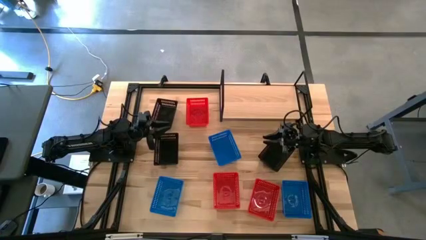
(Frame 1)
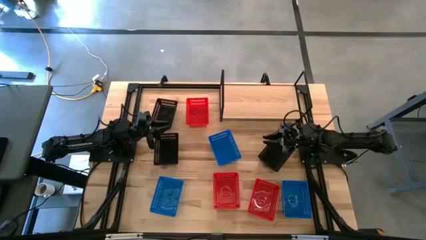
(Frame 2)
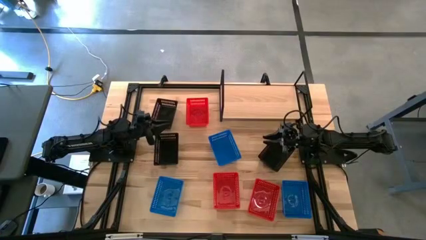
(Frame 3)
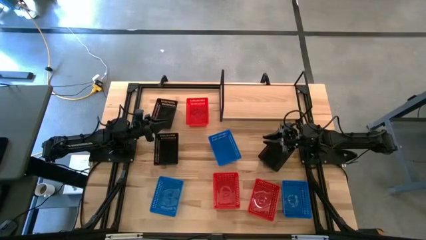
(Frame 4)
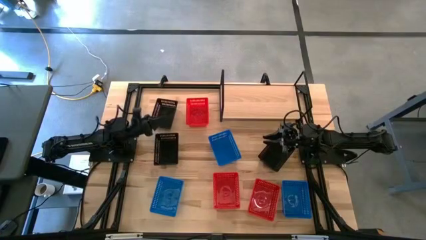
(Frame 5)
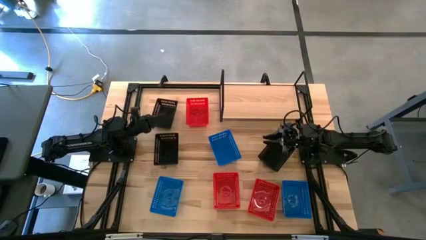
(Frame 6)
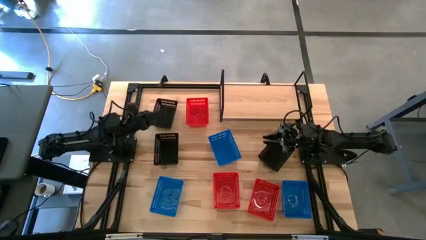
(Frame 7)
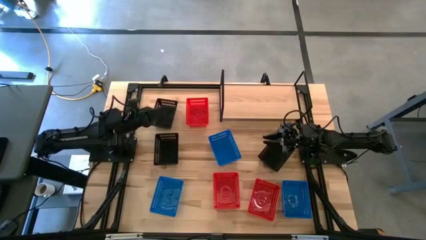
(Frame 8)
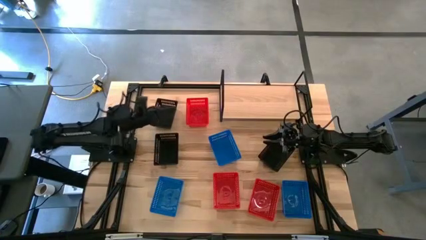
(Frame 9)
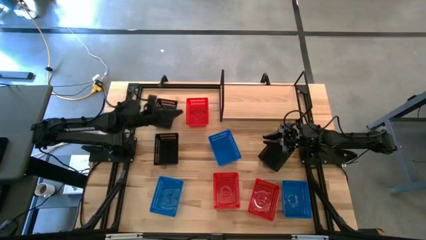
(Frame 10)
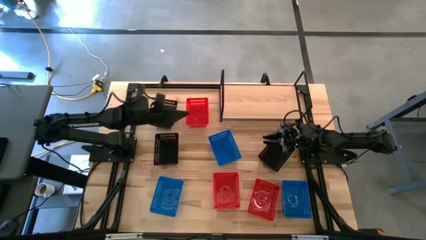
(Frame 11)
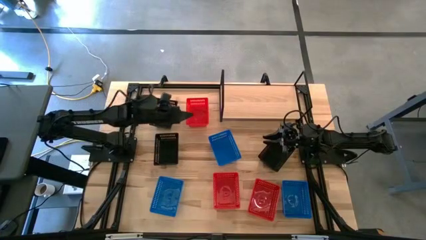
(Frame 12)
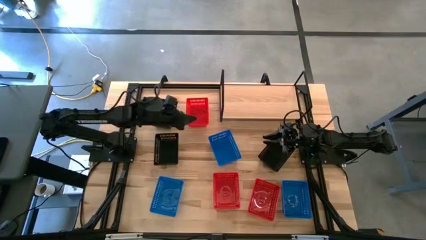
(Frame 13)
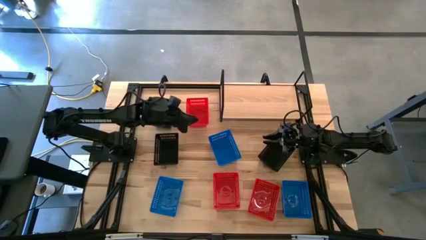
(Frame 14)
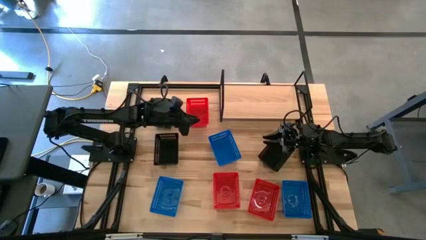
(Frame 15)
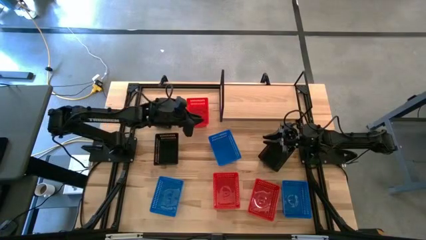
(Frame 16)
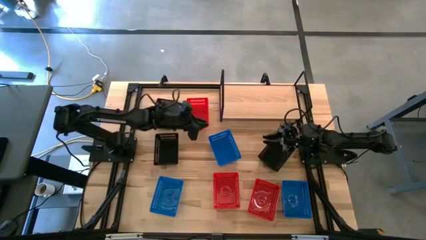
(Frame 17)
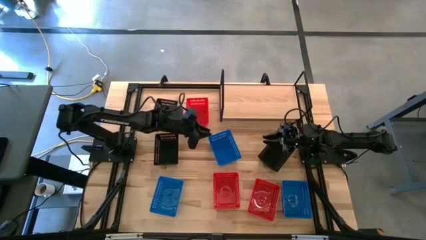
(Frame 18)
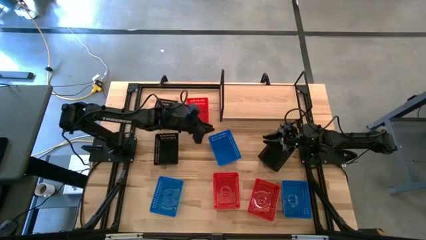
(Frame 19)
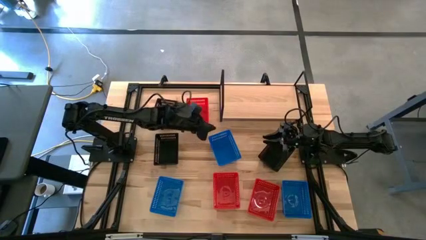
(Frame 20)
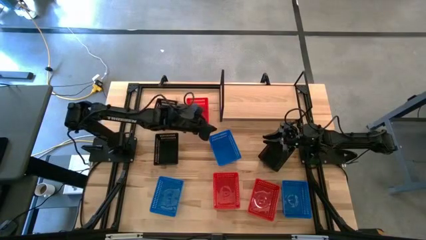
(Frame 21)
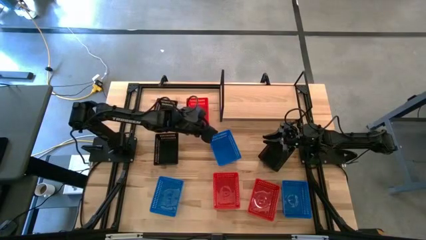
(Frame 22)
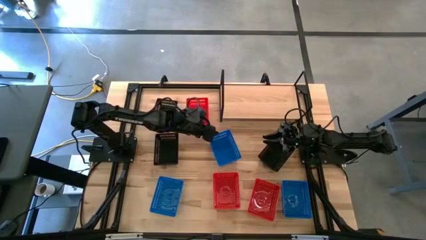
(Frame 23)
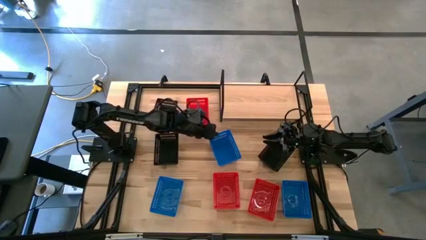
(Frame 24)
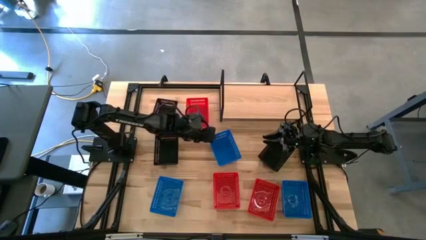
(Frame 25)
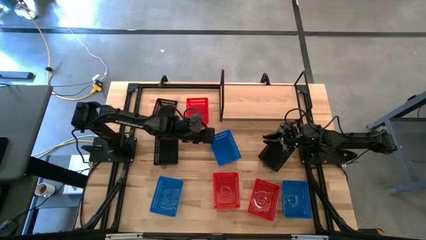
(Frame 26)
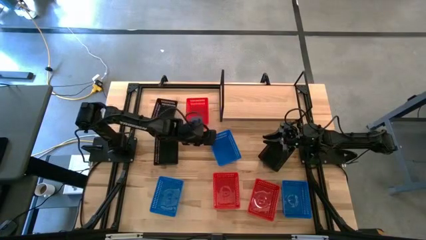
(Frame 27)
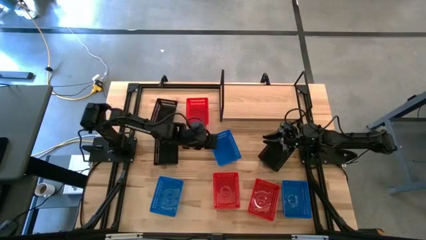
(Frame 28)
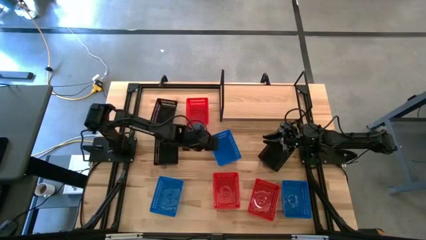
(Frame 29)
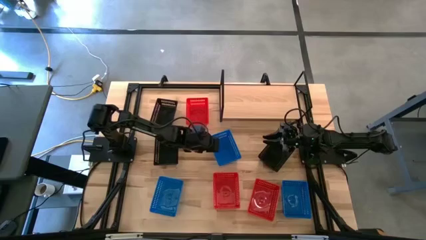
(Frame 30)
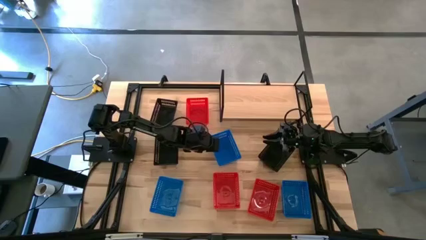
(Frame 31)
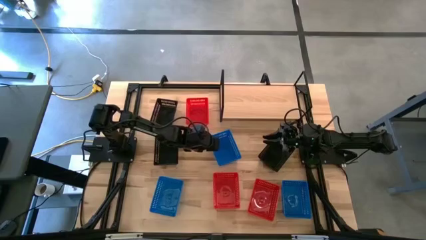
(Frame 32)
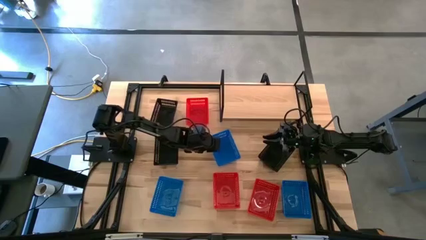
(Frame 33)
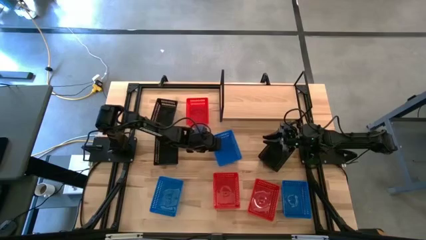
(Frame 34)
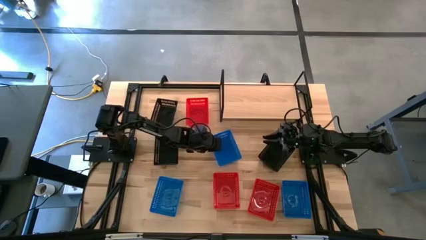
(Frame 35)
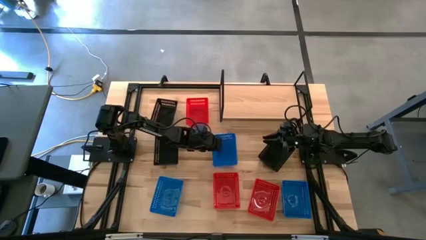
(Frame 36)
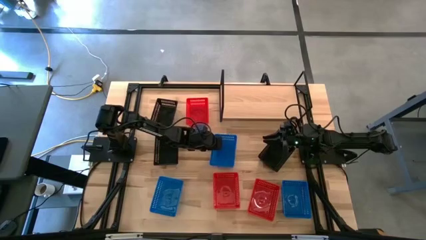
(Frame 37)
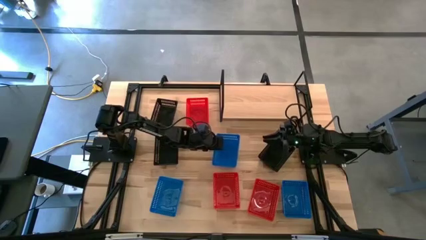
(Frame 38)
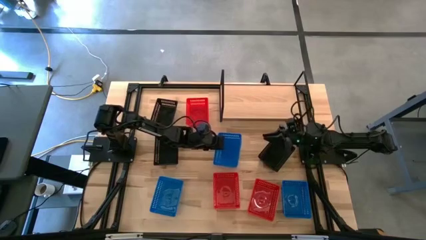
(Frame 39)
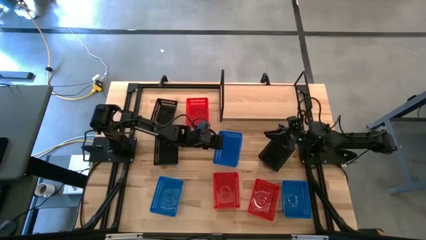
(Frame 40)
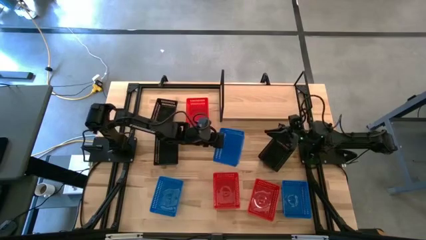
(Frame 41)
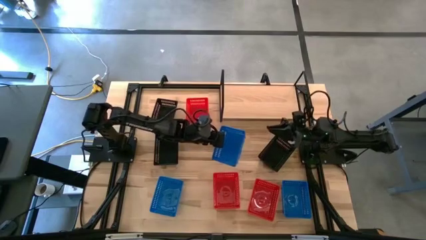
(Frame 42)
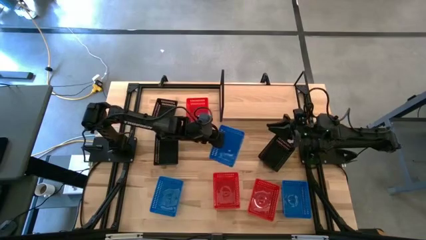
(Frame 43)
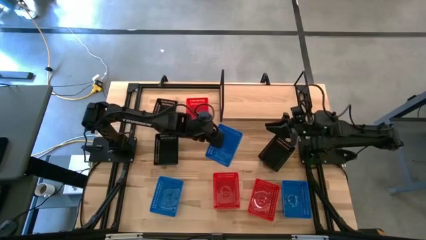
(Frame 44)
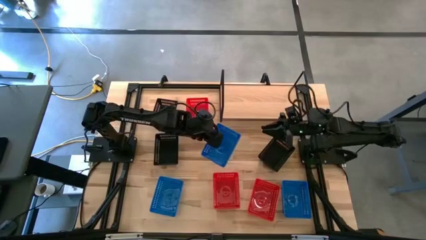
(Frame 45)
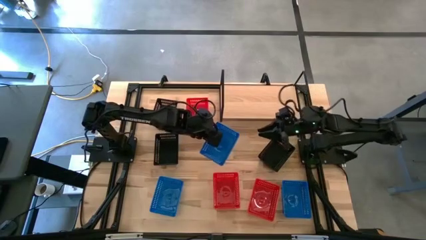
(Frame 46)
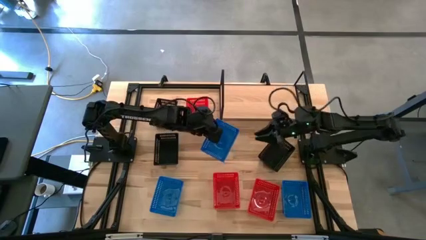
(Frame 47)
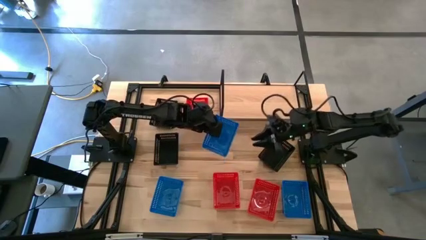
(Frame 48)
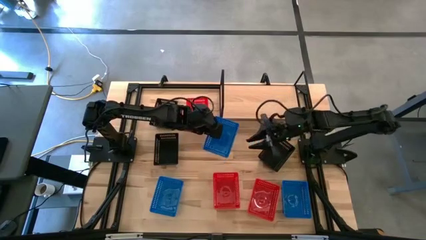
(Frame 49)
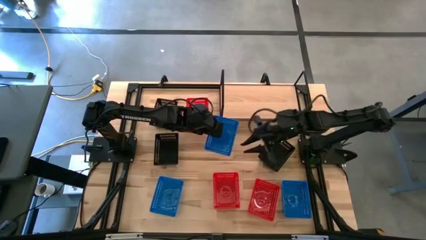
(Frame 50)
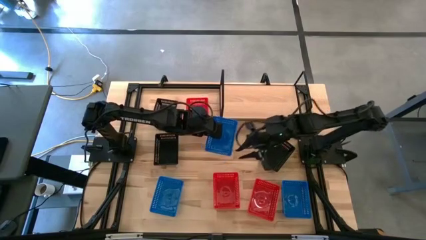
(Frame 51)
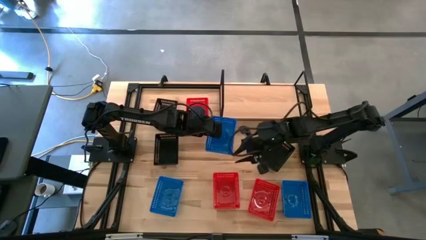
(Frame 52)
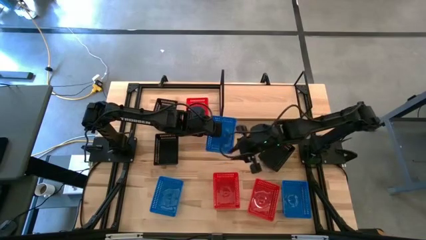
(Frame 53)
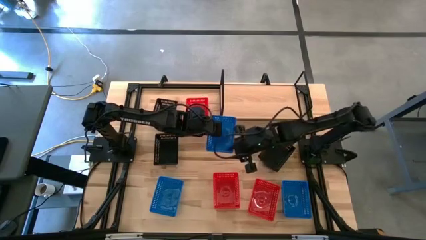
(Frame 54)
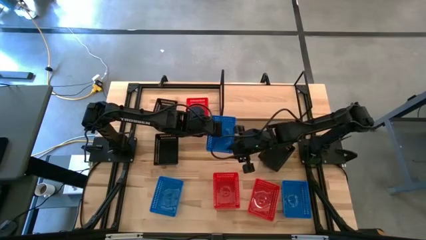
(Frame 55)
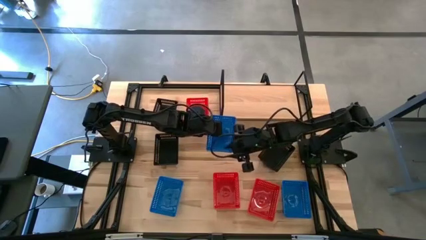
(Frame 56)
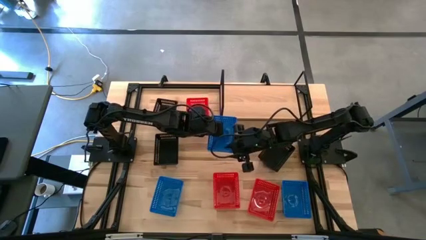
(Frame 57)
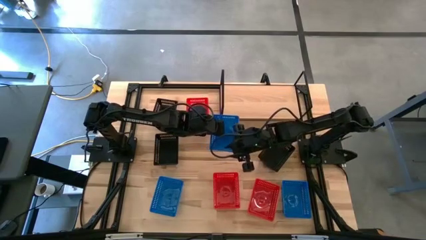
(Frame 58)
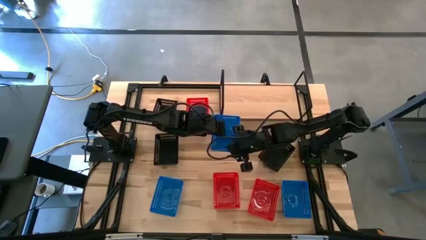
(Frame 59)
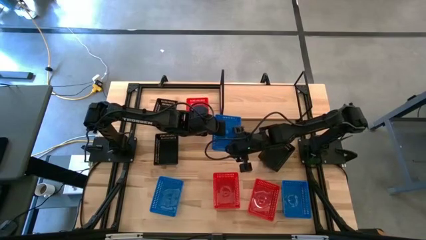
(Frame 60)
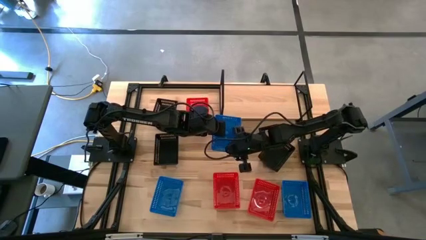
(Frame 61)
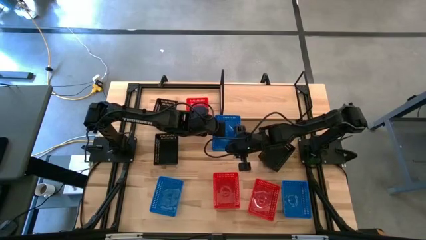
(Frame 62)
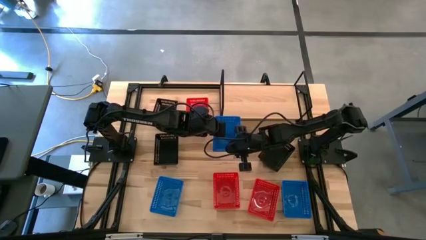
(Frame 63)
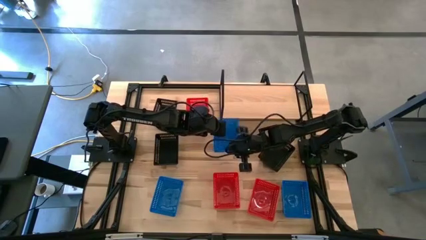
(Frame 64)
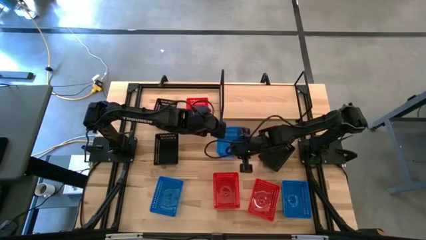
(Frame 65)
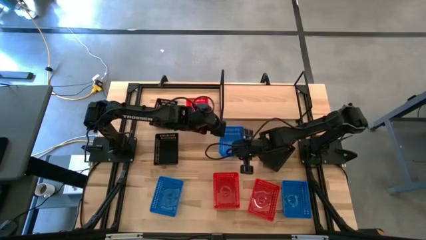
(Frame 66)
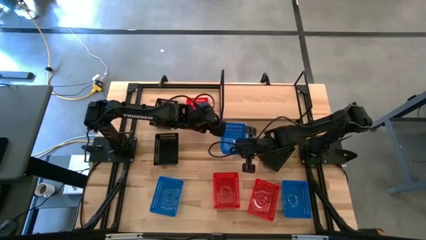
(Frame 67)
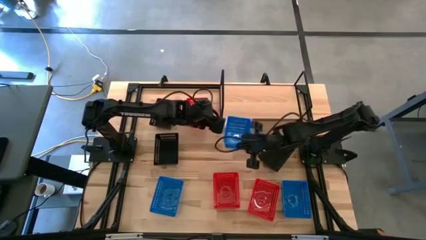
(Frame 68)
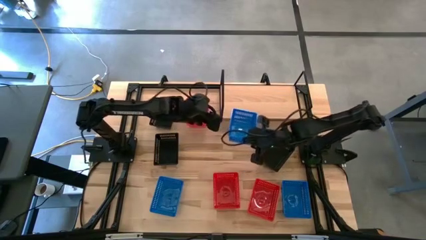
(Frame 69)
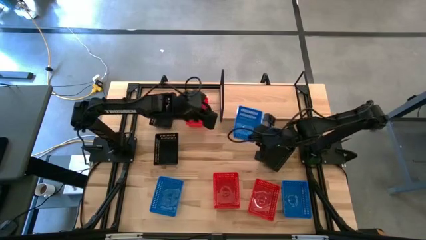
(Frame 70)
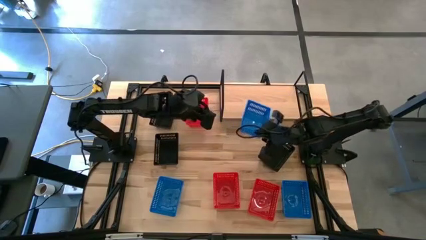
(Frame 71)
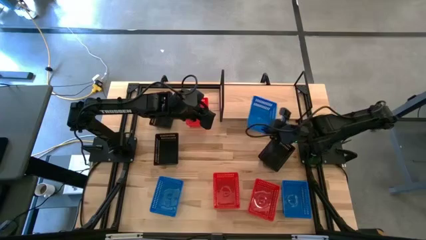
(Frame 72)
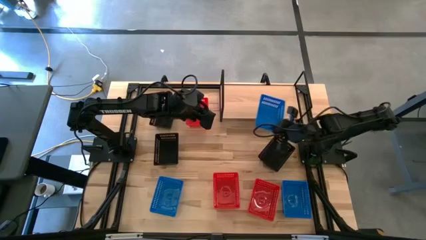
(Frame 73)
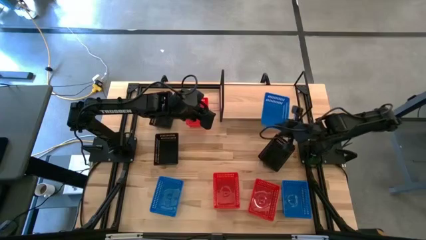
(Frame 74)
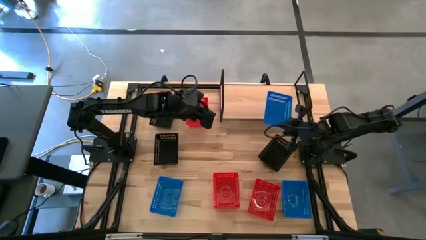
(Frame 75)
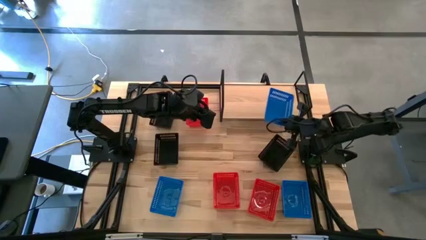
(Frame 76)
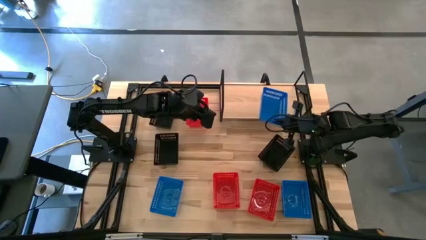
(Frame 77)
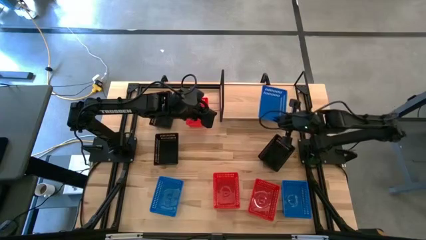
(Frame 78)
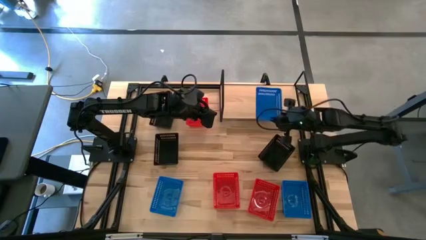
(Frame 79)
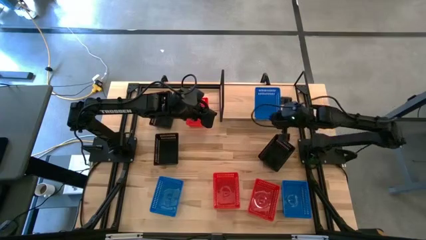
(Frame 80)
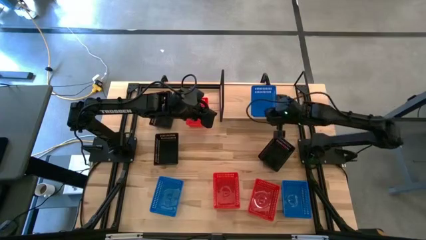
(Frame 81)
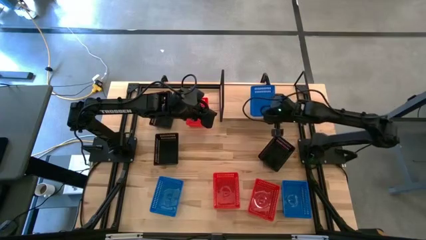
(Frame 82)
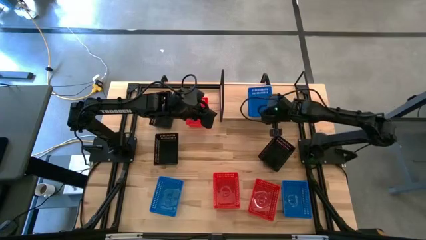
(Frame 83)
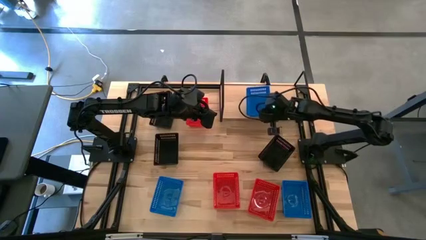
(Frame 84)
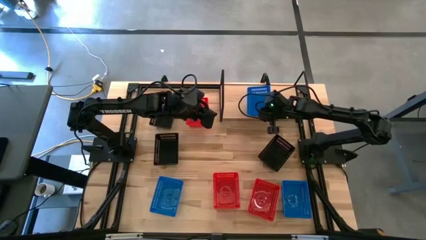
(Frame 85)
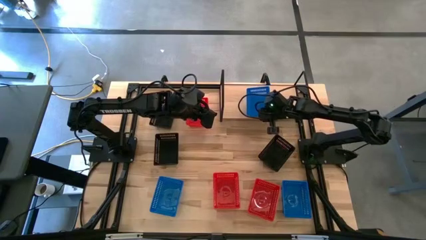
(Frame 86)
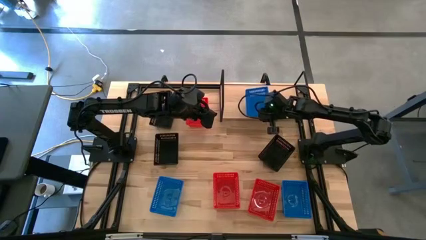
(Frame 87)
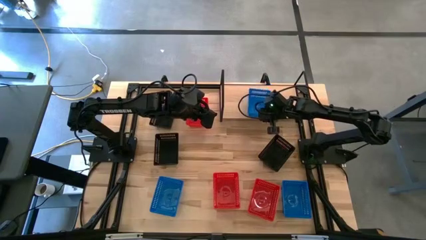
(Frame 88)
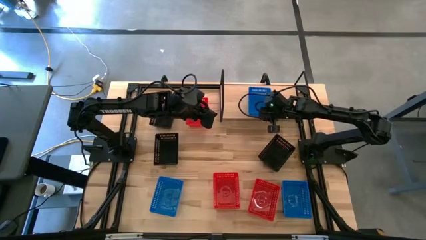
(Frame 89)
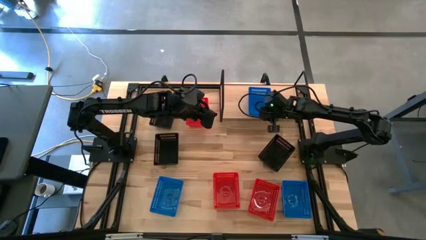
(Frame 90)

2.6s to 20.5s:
Task: Stack baskets on shelf by color
Put the top middle blue bin on the shelf
